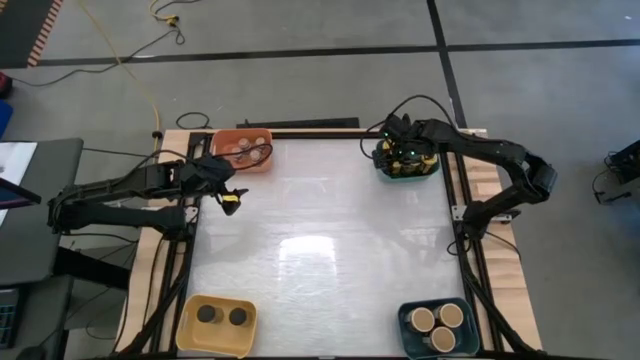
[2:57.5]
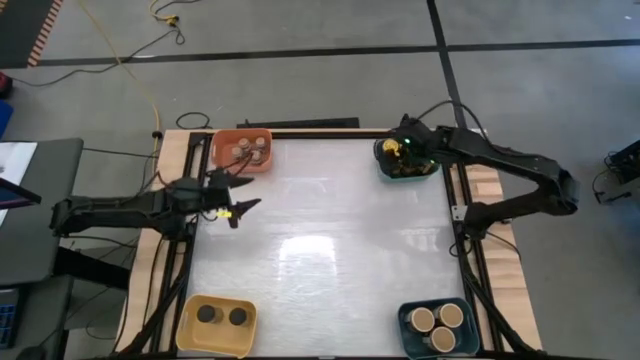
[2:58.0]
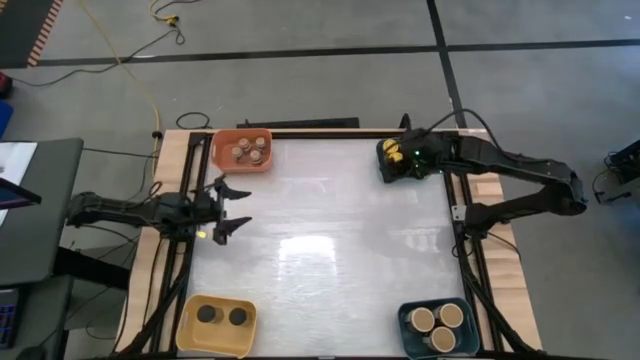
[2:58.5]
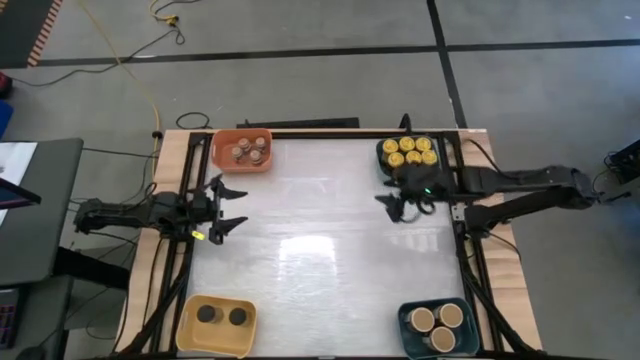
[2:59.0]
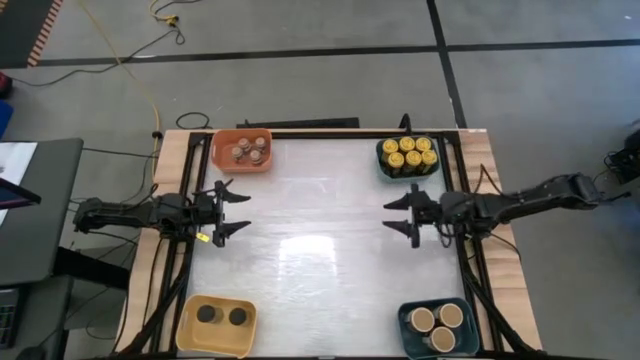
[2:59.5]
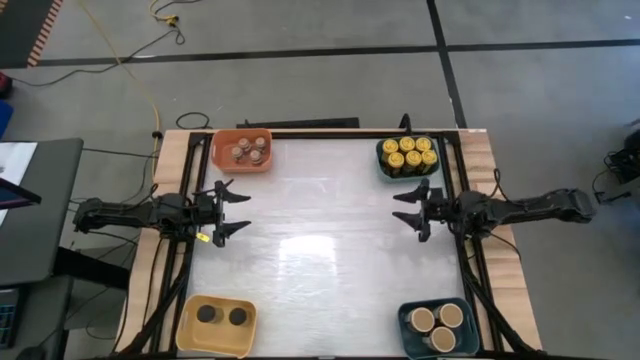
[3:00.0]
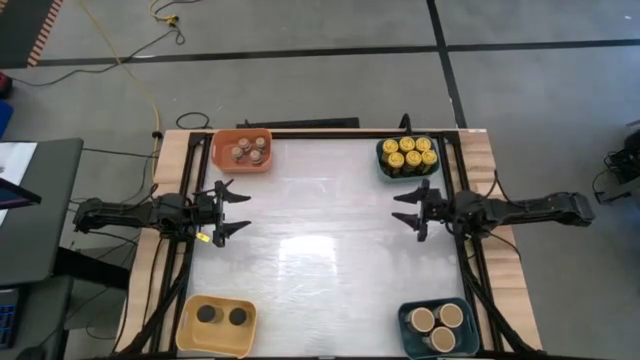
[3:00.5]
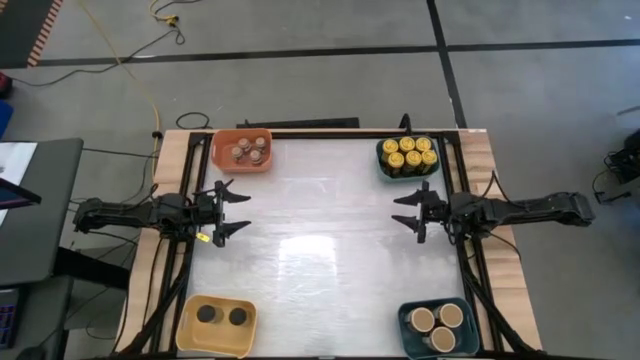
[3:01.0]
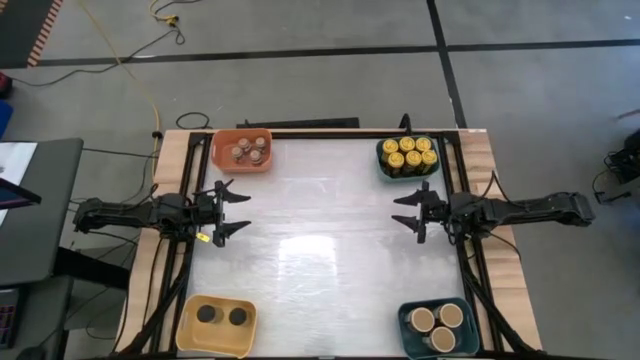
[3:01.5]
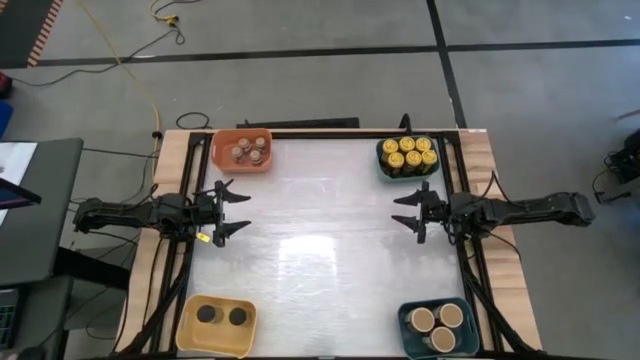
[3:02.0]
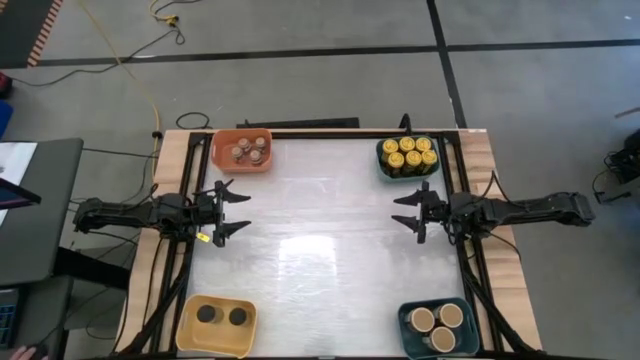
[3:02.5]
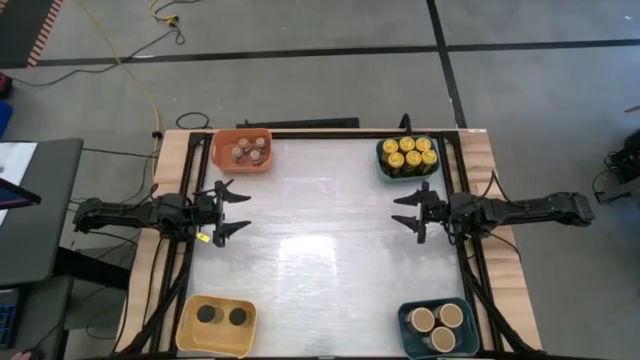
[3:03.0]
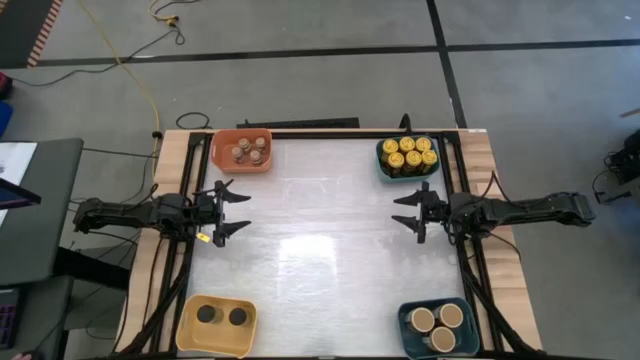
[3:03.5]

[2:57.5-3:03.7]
Task: Sort spices by type
Return to Home Position

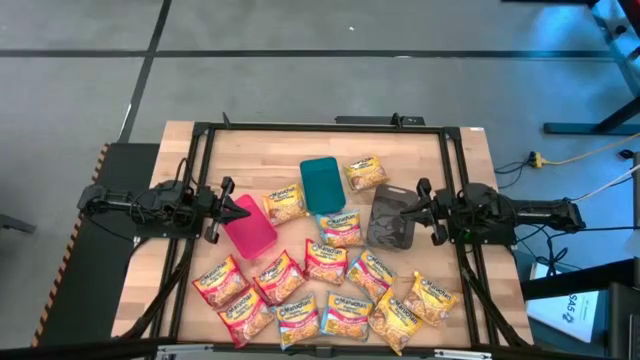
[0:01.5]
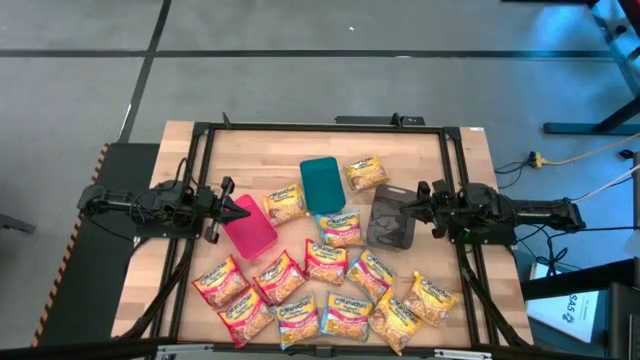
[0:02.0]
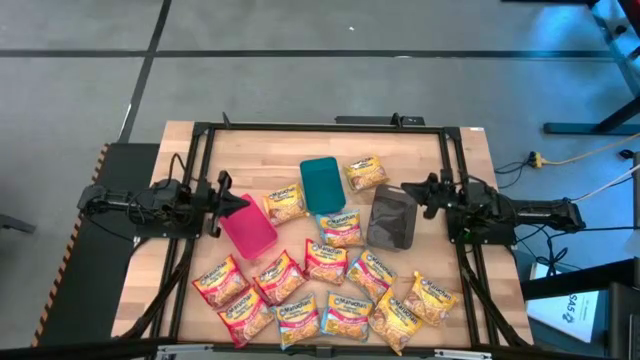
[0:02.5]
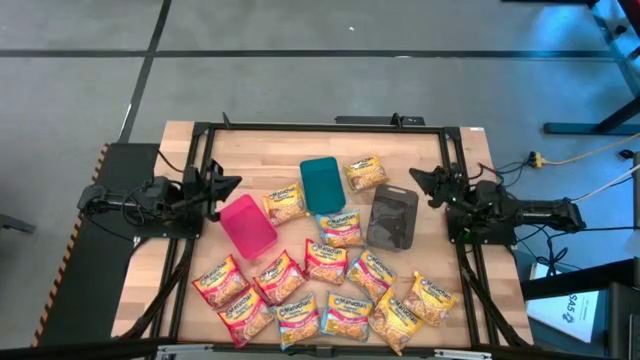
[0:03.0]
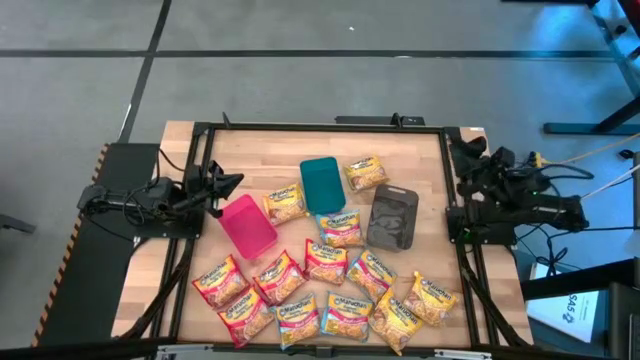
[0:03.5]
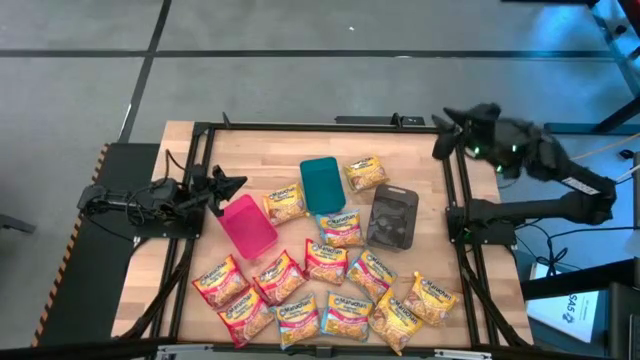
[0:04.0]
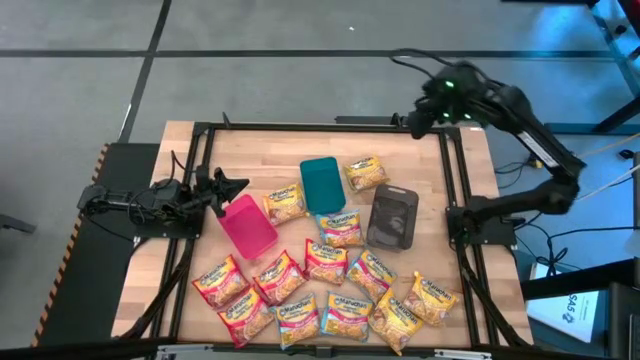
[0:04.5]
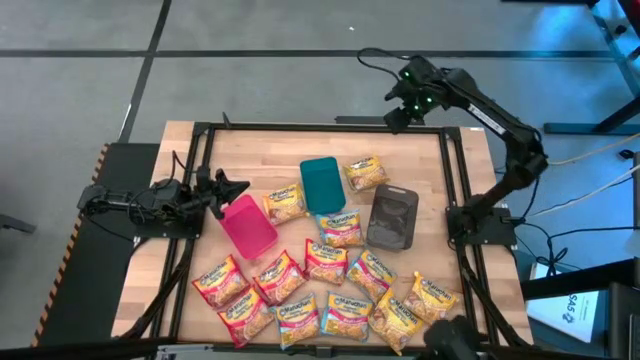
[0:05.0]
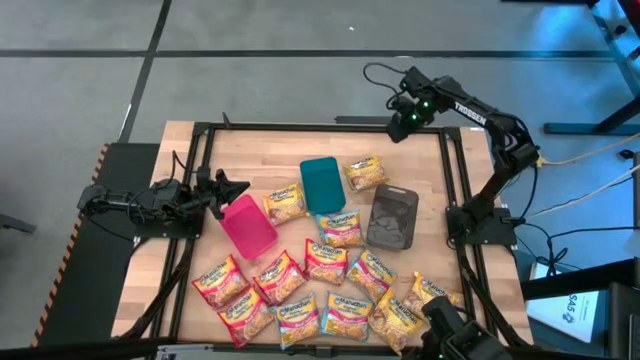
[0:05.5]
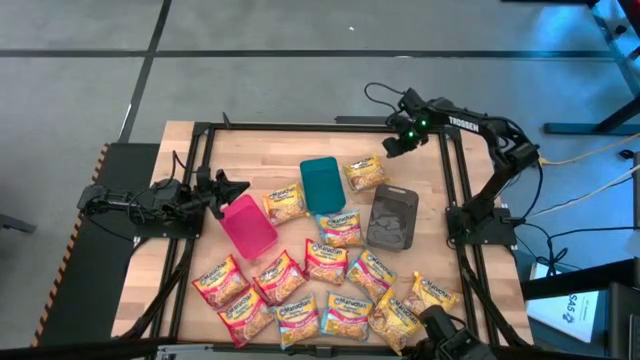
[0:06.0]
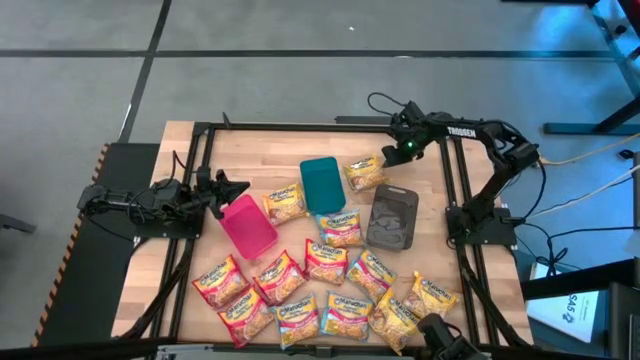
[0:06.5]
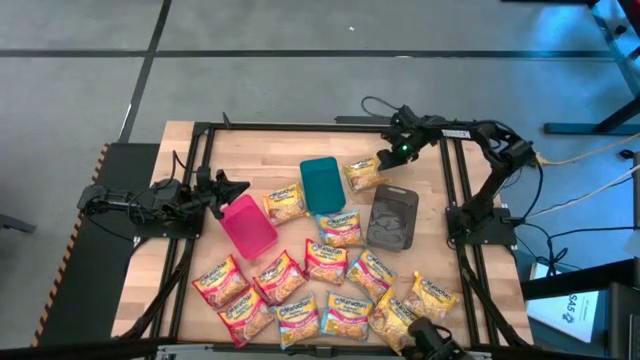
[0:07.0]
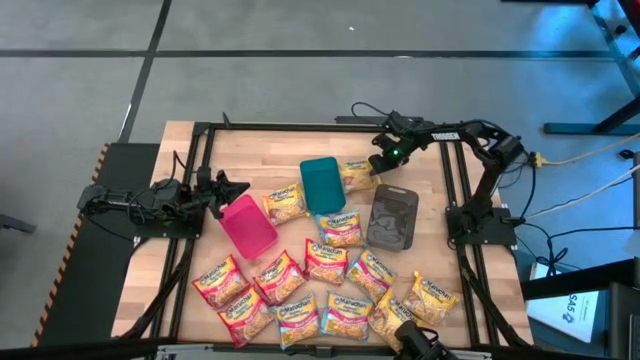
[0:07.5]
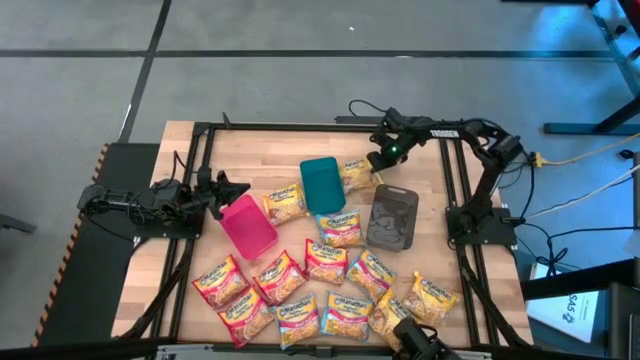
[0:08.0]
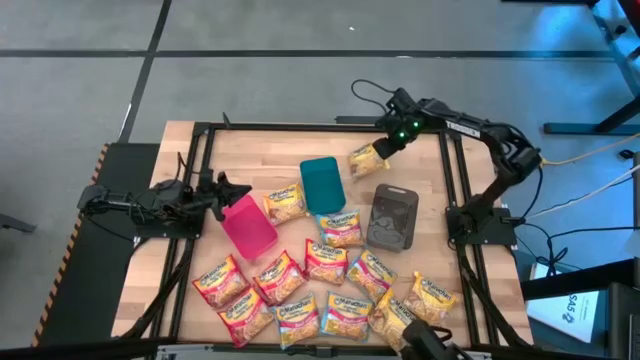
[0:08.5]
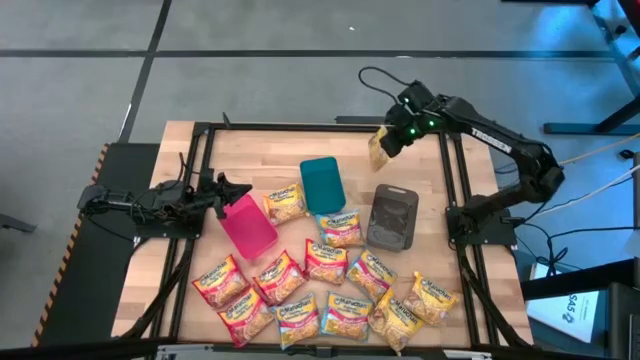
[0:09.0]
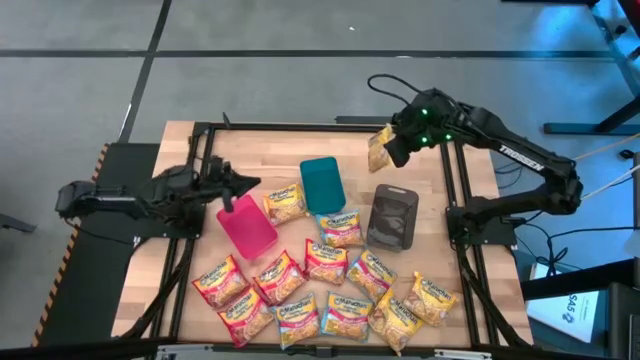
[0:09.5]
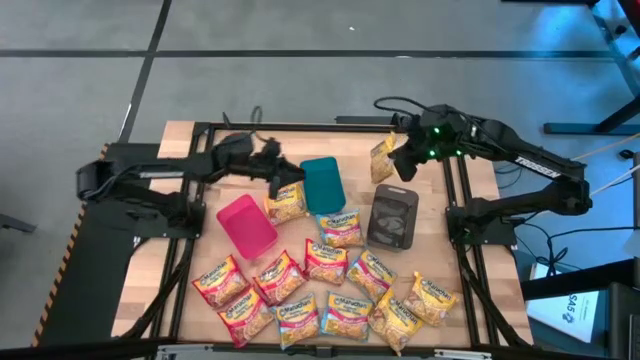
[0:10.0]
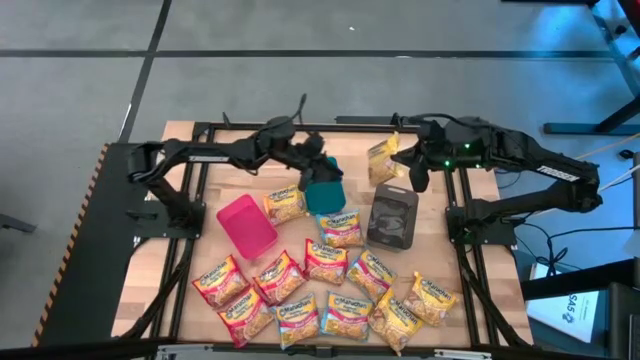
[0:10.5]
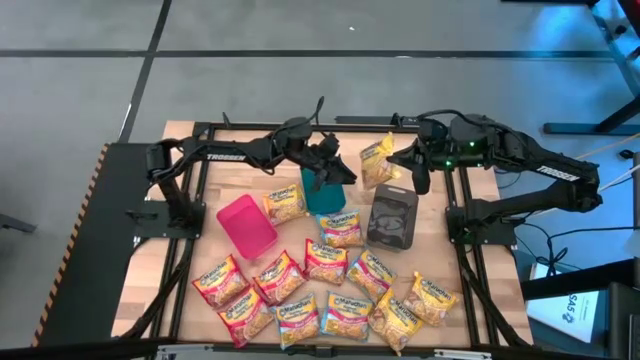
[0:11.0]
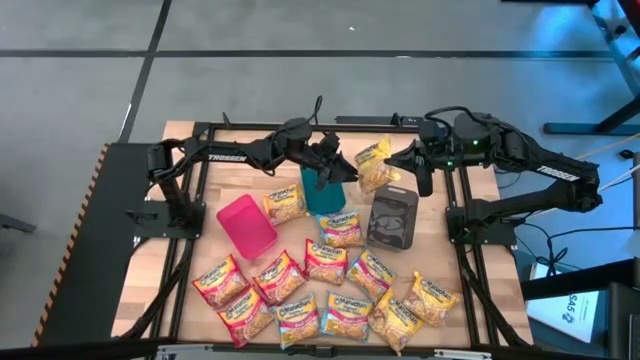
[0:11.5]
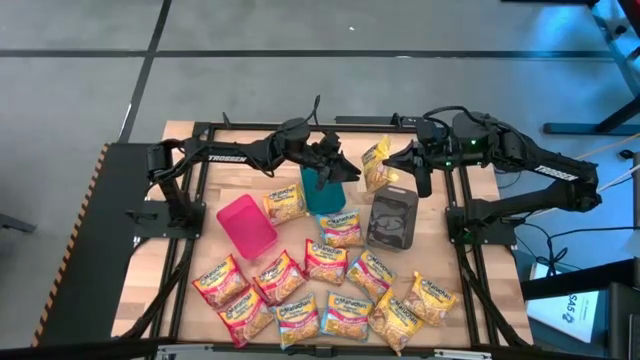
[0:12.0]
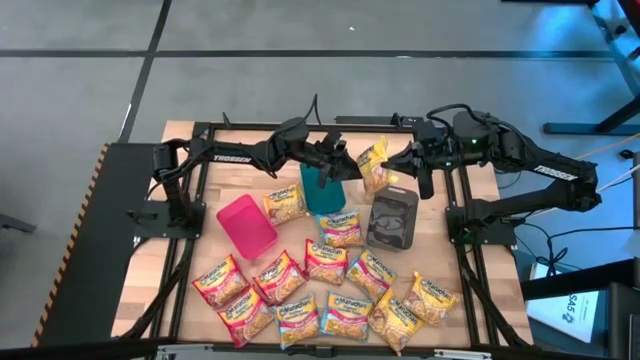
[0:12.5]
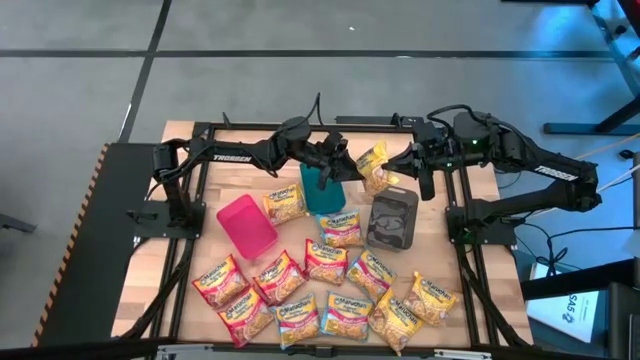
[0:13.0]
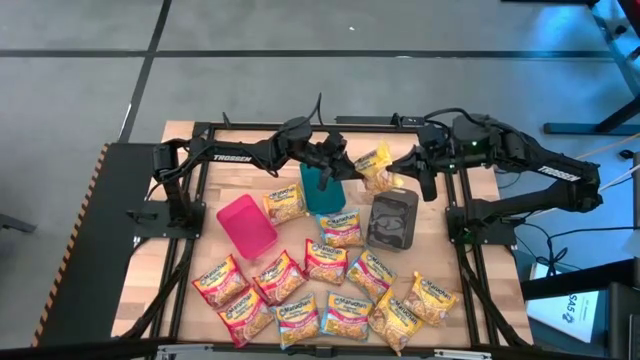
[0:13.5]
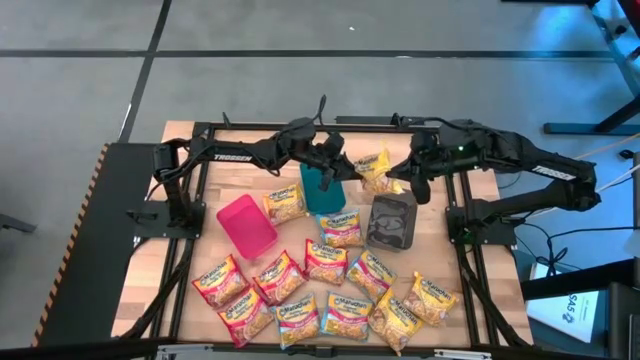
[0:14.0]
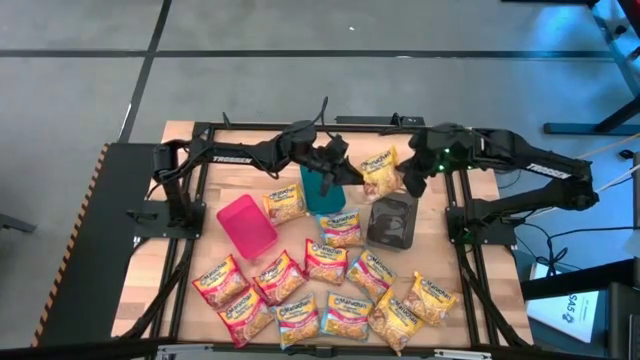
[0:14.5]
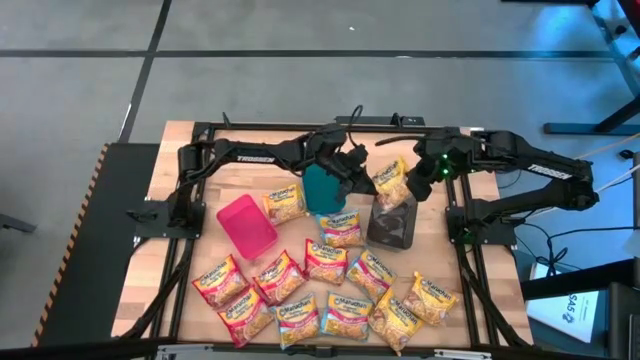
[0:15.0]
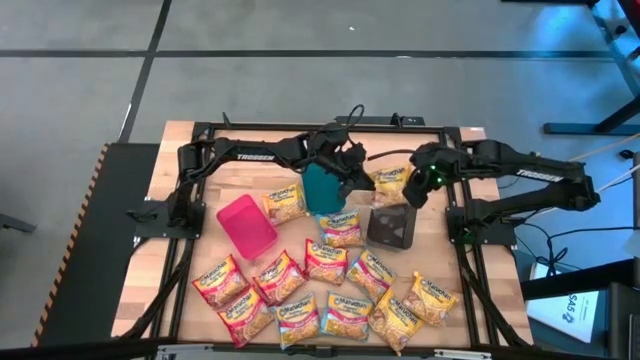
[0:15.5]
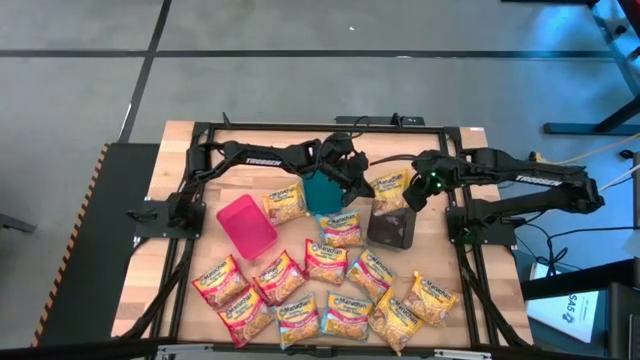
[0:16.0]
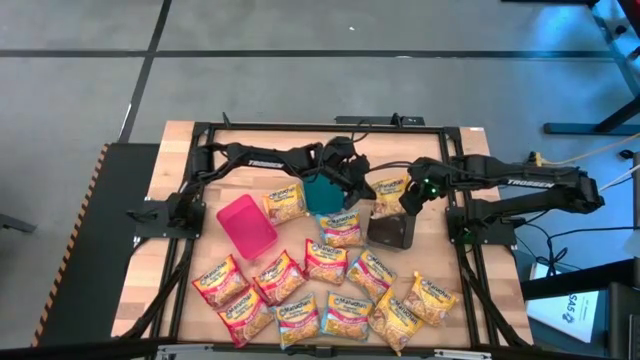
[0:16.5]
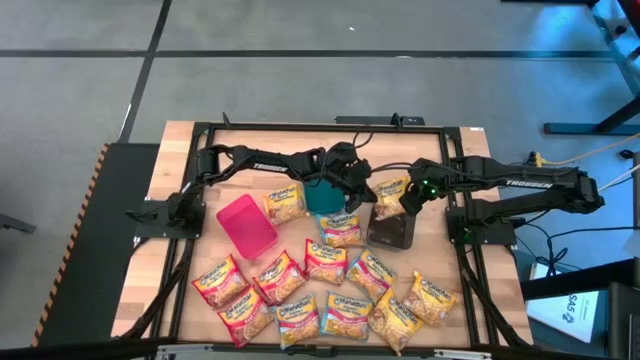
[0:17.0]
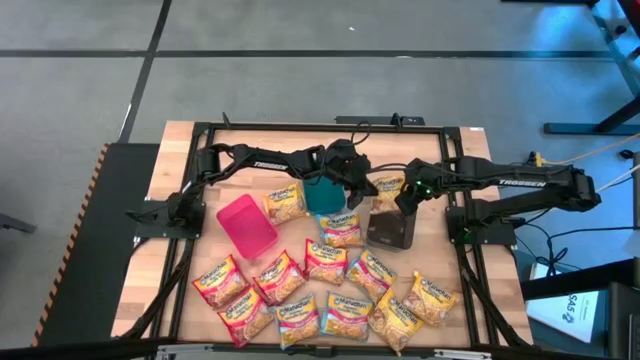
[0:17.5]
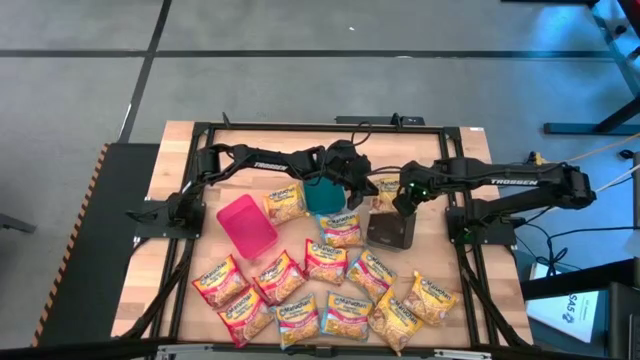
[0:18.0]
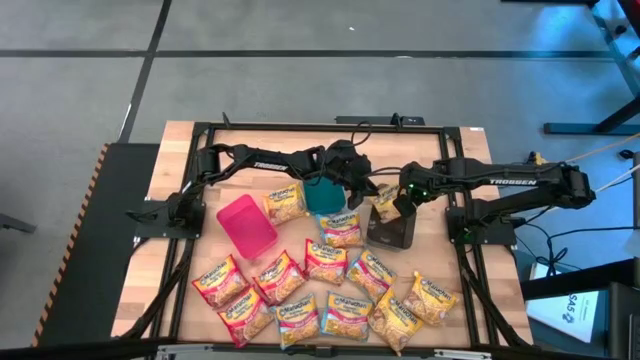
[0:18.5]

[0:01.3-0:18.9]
Task: Sort Maruchan noodles
Put the yellow noodle pack into the black bin
